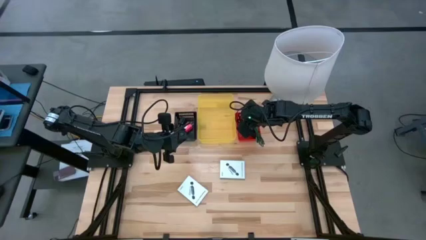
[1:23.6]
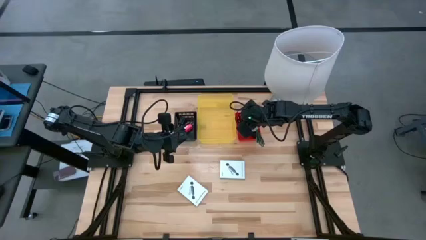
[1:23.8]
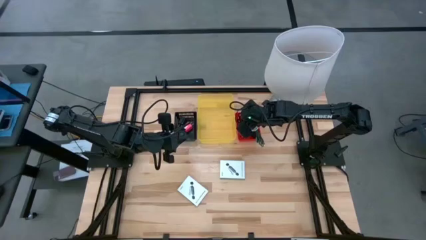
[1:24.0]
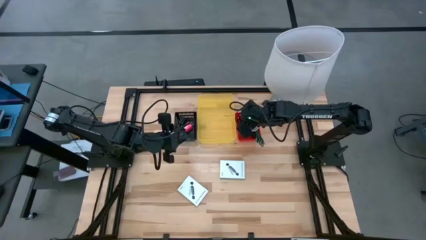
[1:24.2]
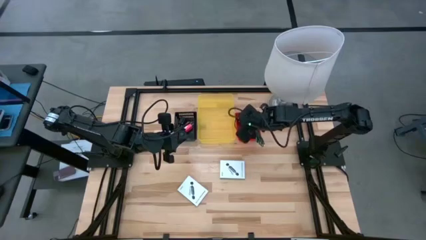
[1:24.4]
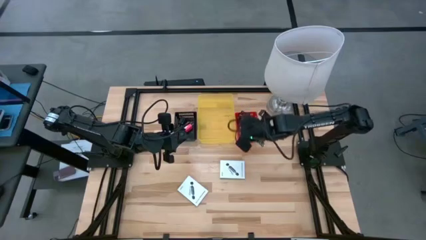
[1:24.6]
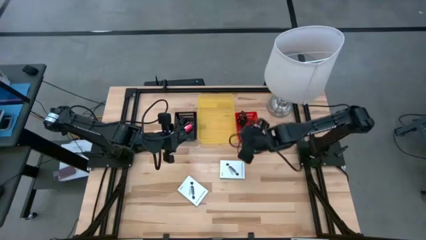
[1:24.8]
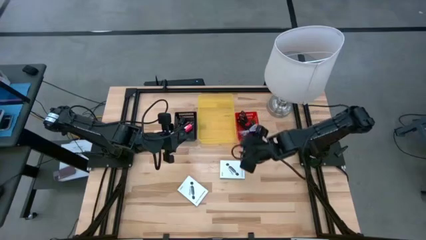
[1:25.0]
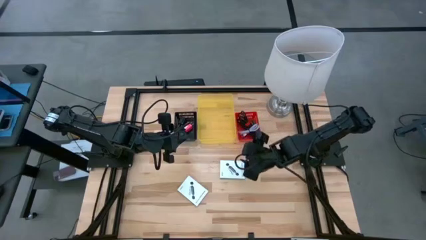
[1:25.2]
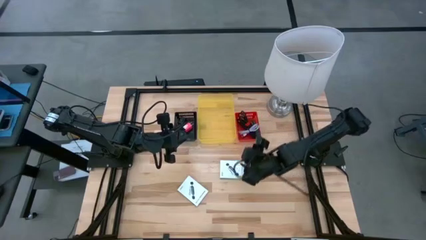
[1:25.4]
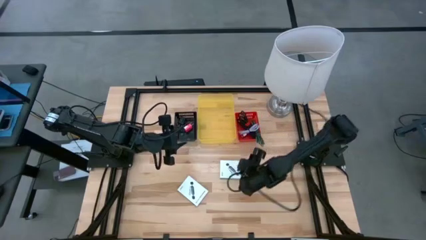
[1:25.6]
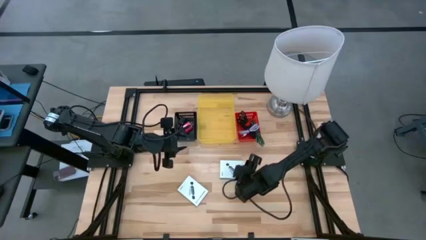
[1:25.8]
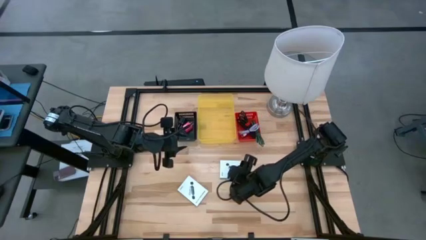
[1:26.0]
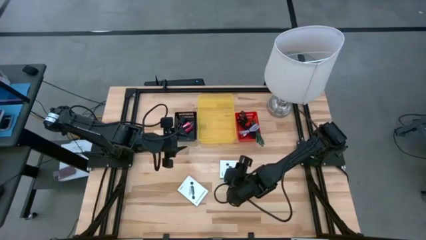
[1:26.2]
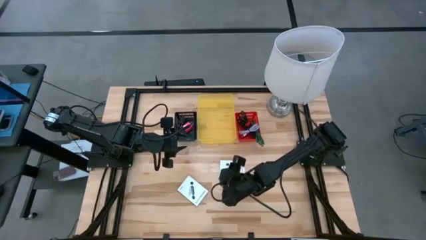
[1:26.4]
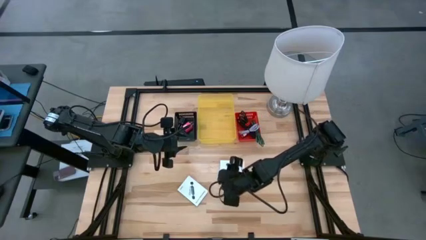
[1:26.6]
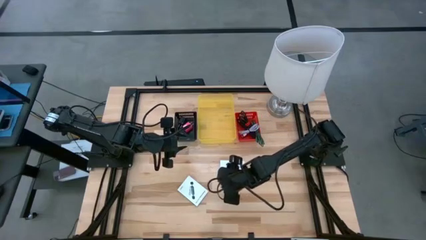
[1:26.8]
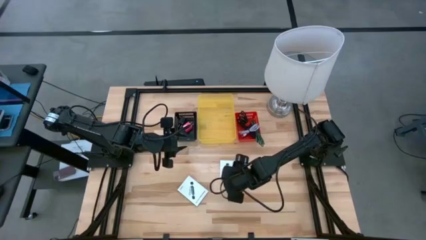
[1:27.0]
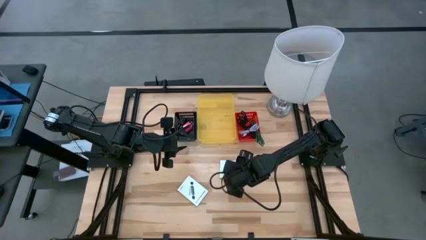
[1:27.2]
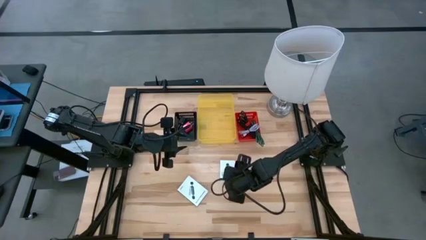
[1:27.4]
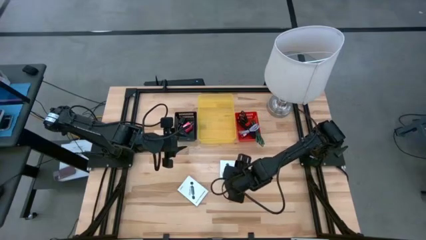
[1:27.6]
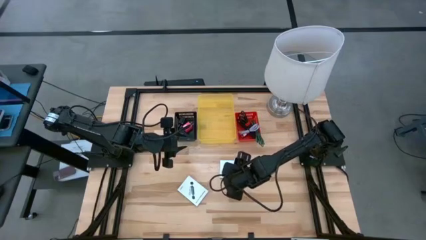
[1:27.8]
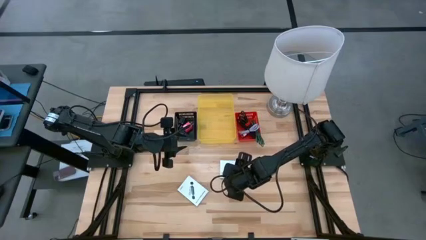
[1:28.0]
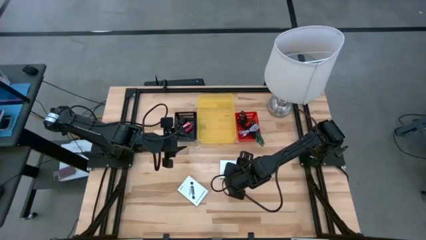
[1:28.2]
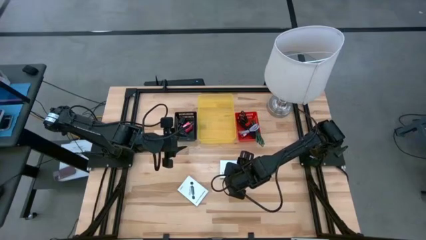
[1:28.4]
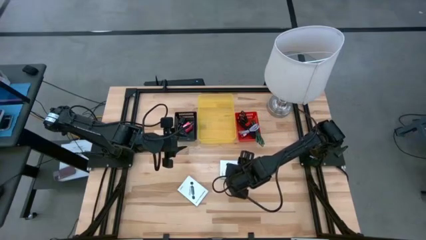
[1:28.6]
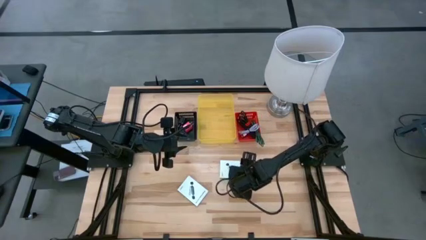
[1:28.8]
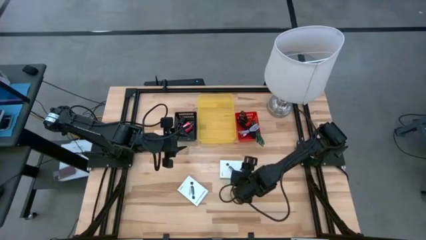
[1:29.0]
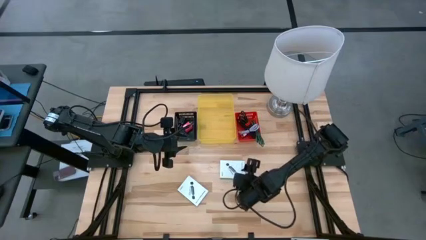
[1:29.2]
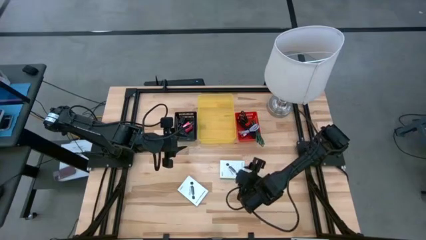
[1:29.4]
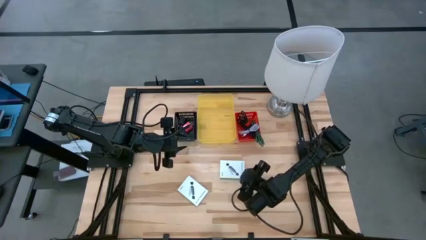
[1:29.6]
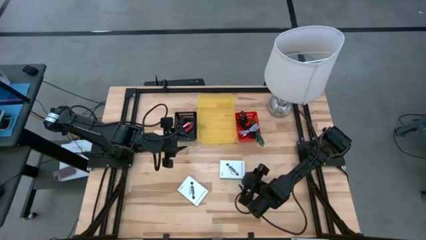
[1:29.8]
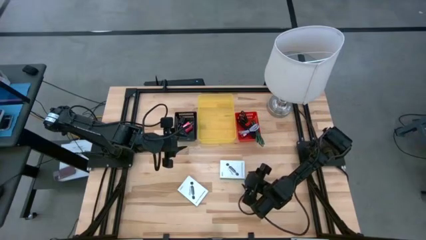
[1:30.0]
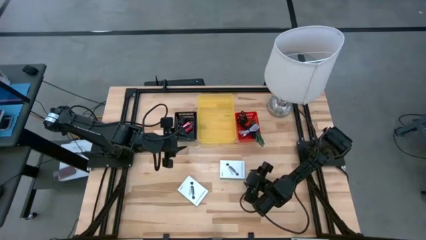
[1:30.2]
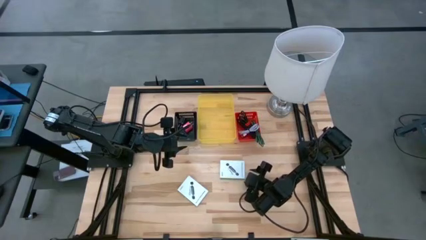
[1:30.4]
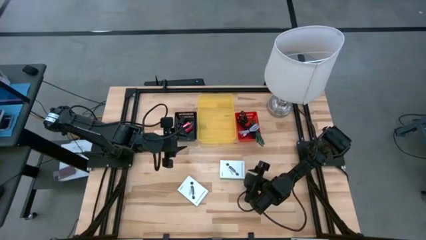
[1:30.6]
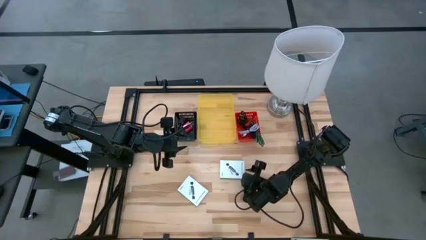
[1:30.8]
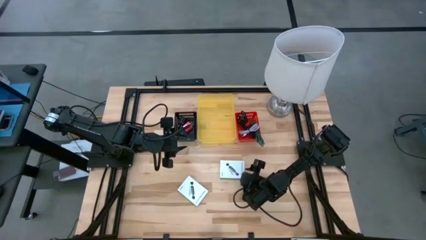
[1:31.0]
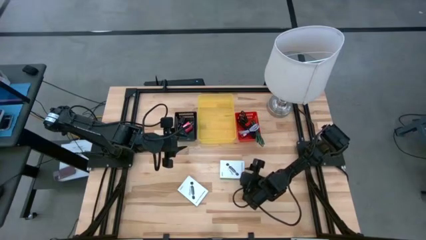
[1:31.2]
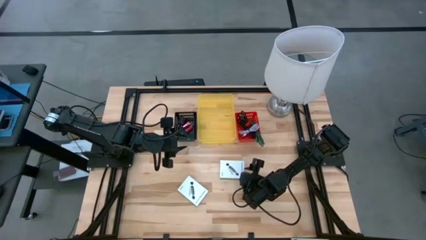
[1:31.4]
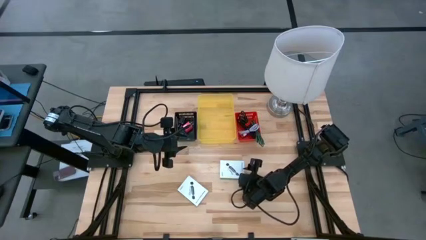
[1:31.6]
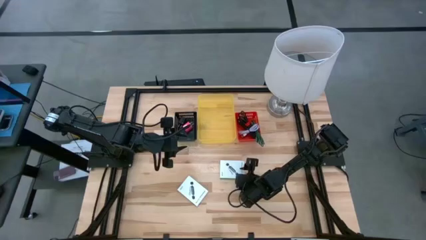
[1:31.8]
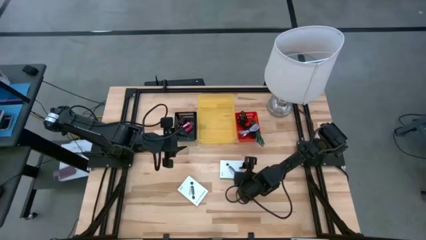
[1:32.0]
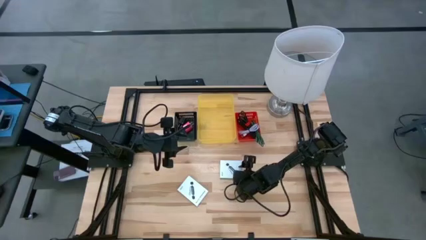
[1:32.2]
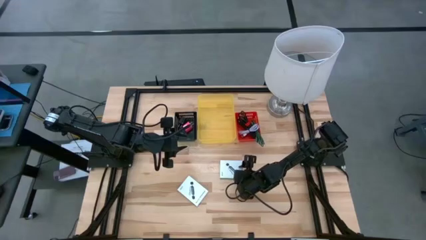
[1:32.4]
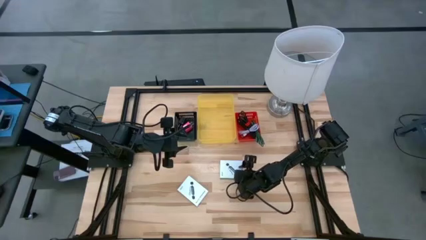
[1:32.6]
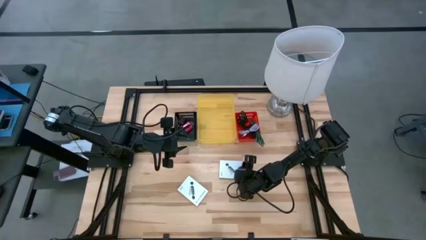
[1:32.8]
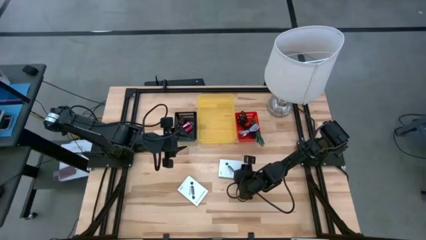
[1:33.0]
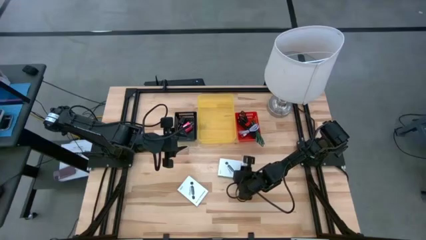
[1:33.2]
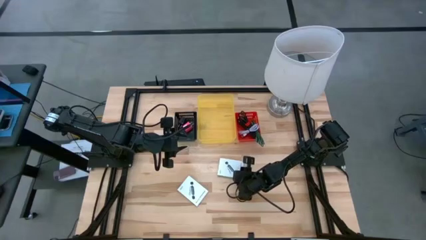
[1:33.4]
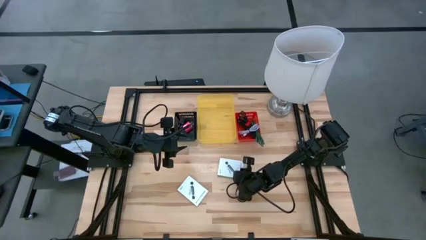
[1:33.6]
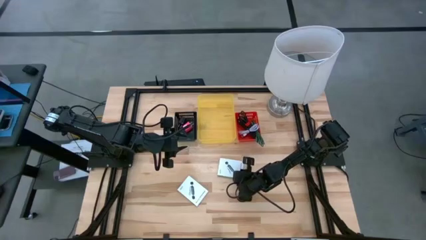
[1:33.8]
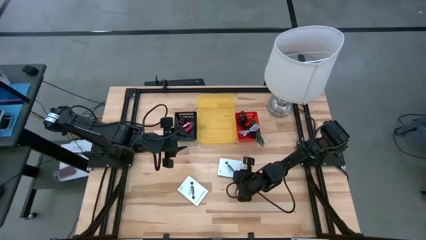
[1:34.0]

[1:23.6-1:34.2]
Task: Pick and place items into bin
Put the top card reader box into the yellow bin

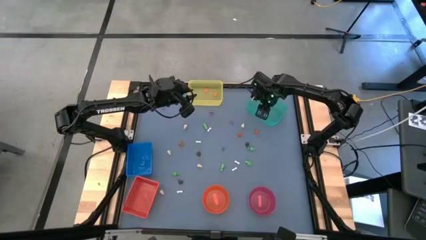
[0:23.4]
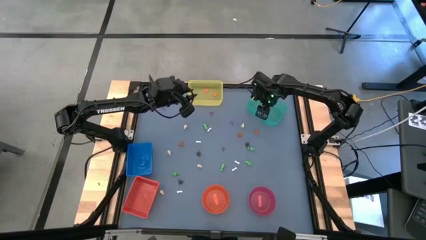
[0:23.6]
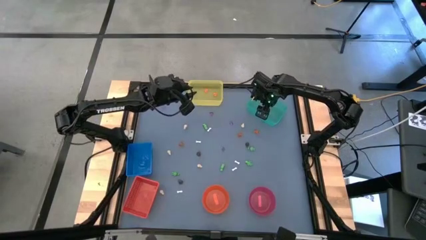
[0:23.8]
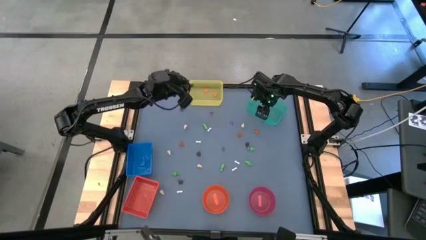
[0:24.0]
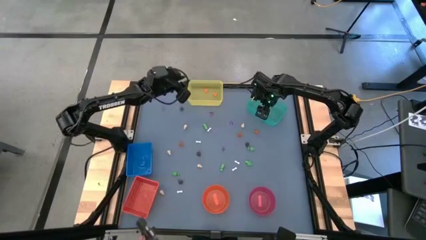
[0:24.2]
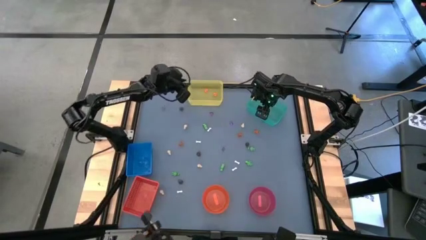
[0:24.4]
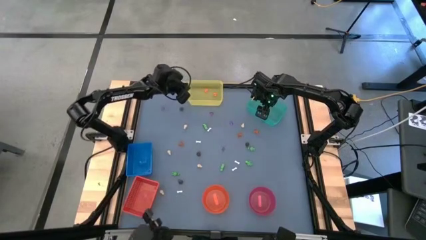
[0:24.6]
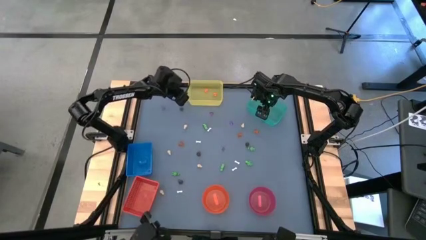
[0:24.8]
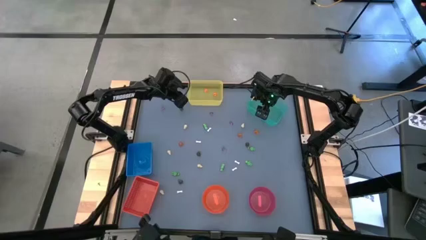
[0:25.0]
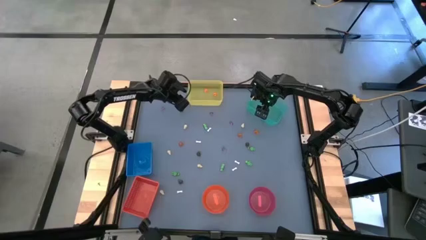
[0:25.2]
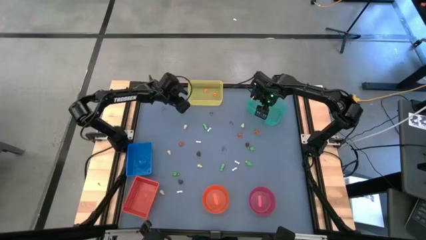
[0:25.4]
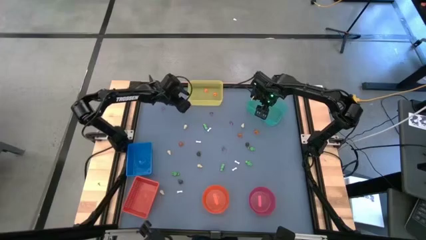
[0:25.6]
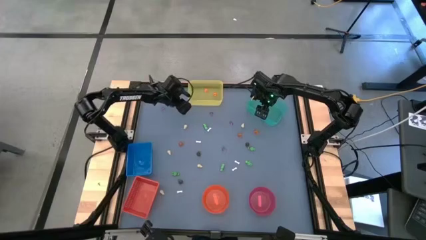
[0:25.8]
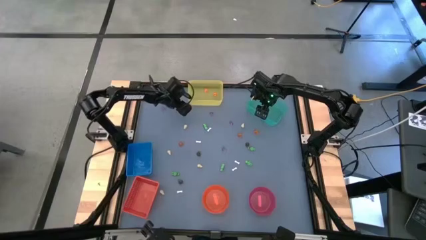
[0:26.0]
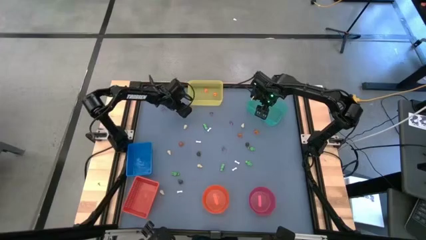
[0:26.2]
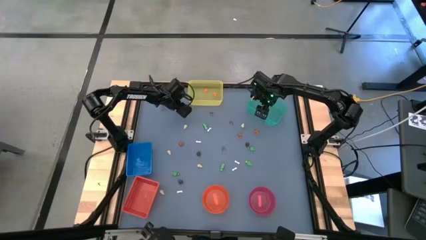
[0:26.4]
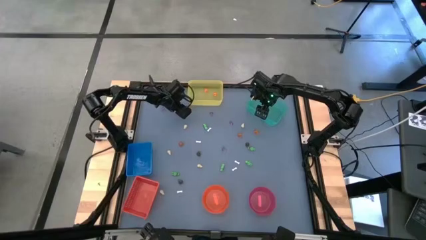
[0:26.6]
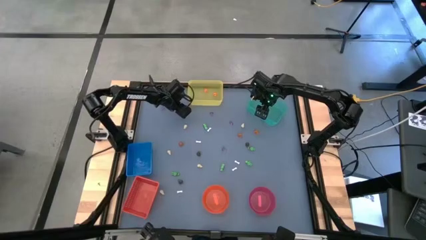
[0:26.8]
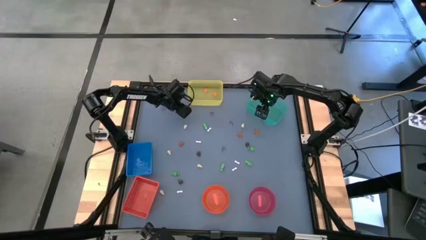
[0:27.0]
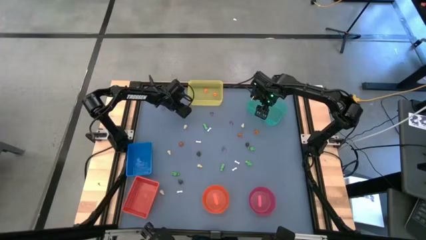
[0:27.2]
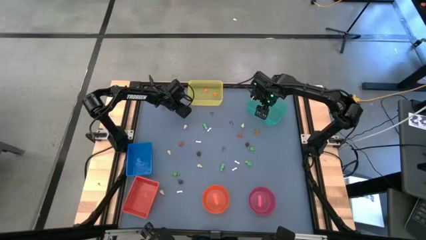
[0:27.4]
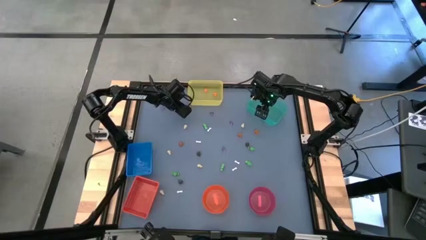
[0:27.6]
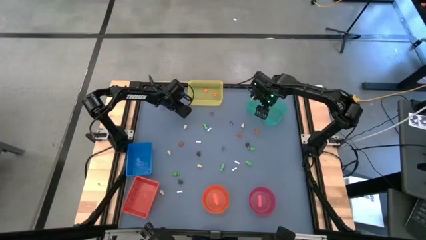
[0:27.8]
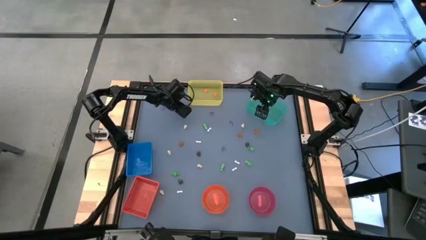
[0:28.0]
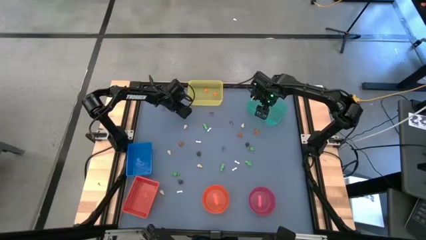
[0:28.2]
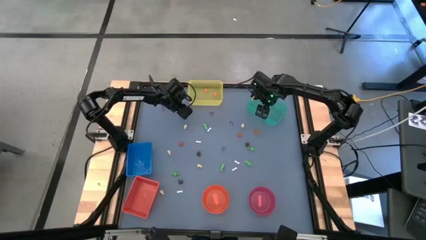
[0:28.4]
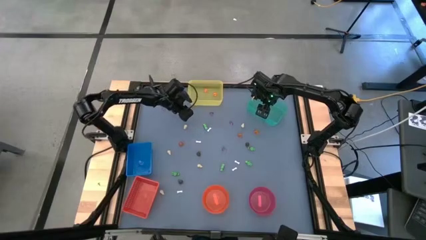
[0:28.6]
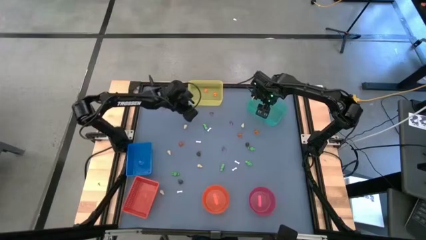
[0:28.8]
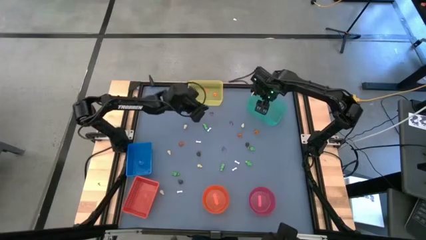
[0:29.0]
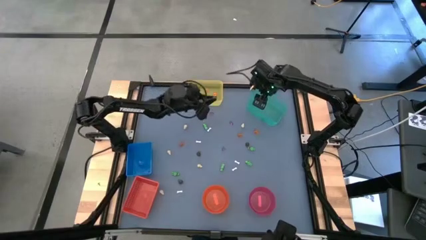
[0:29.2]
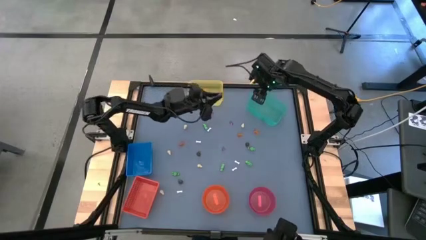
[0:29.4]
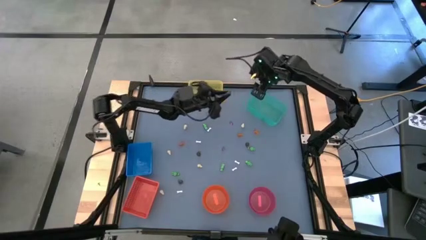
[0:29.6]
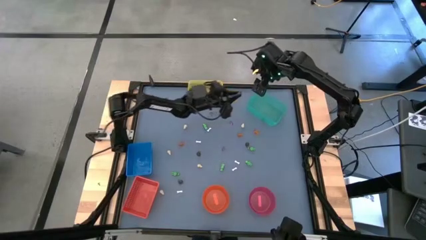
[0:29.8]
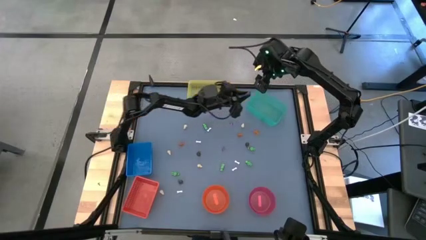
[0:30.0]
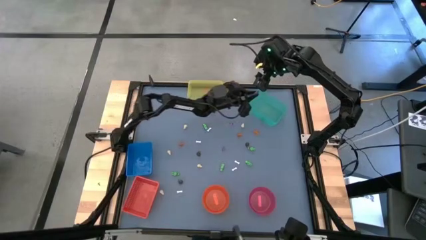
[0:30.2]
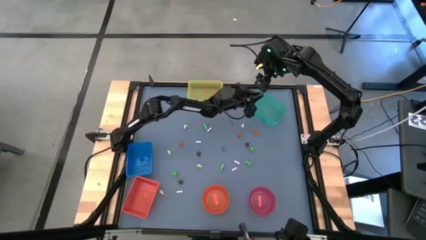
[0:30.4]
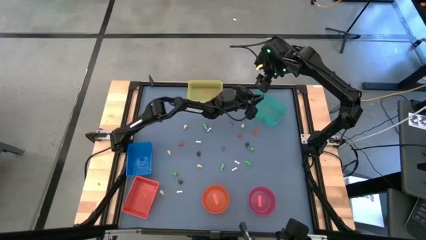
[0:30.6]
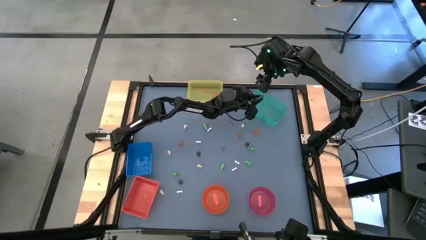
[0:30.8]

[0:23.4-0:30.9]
Task: Sort Halloween decoration
Put the black skull toy into the light blue bin
